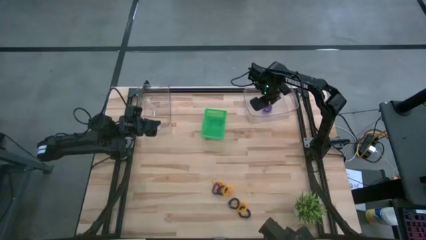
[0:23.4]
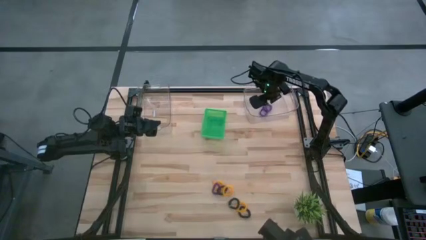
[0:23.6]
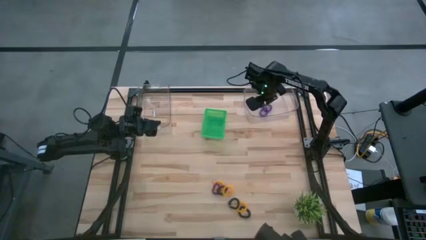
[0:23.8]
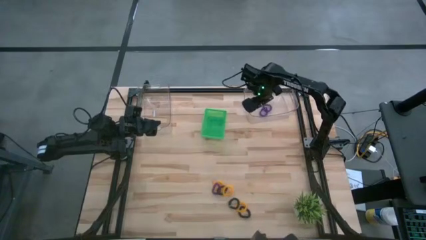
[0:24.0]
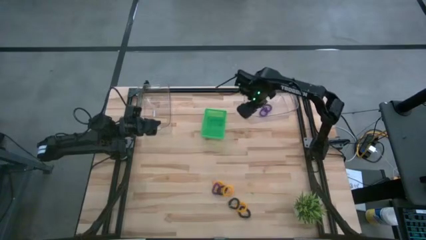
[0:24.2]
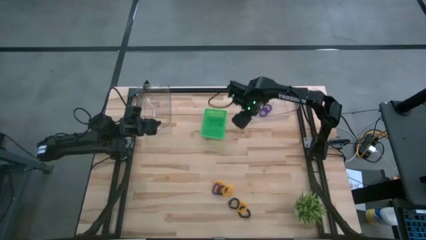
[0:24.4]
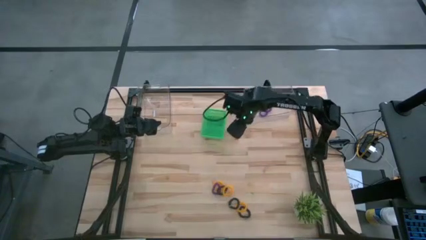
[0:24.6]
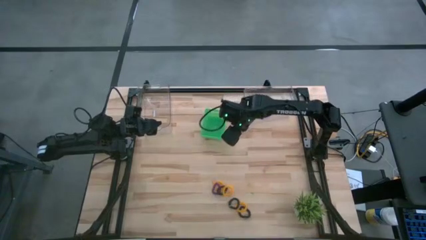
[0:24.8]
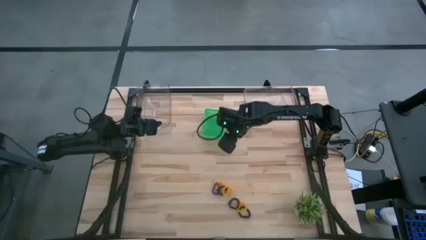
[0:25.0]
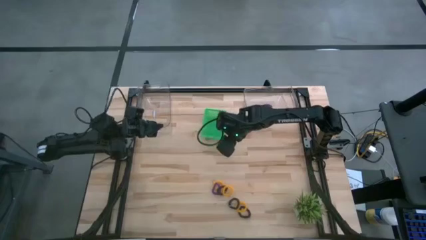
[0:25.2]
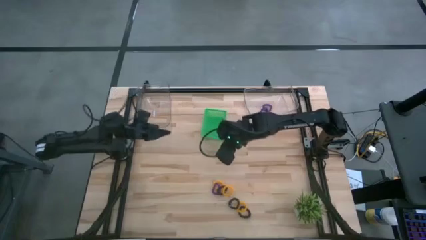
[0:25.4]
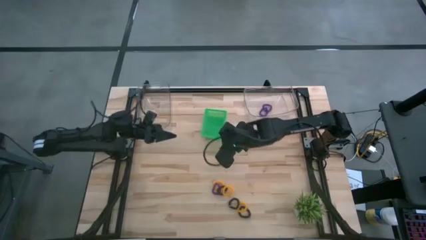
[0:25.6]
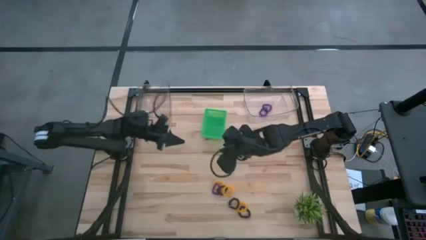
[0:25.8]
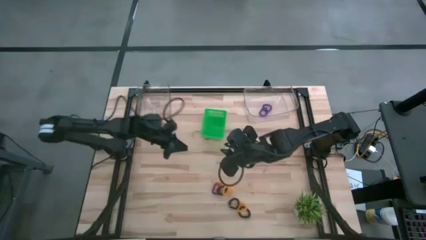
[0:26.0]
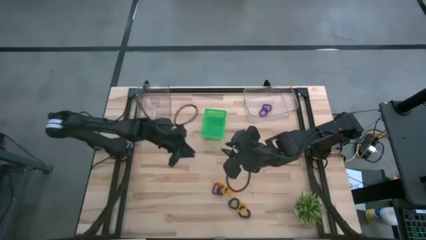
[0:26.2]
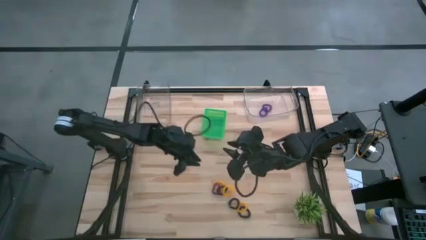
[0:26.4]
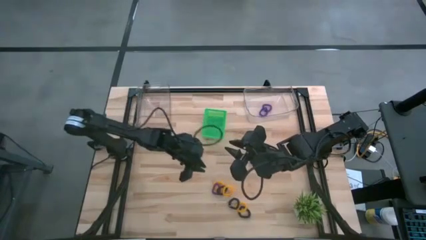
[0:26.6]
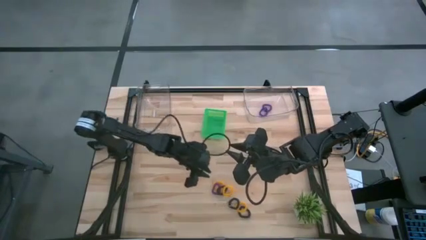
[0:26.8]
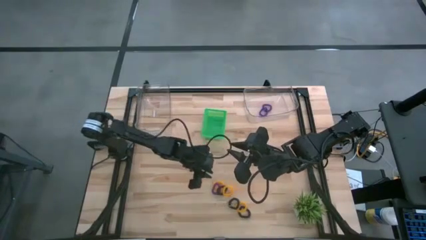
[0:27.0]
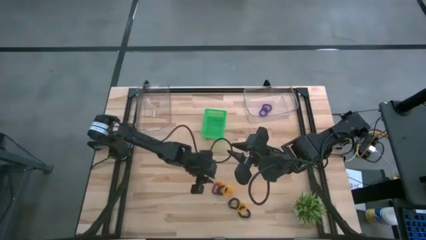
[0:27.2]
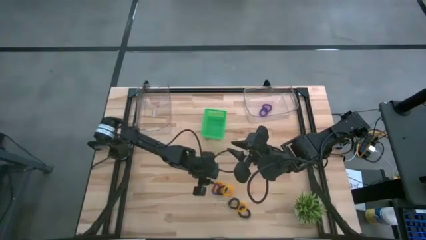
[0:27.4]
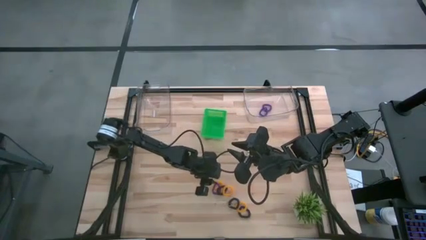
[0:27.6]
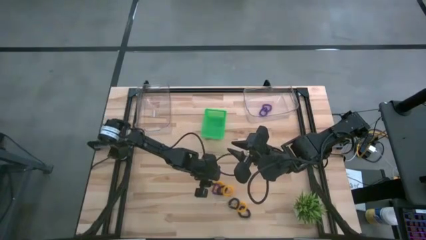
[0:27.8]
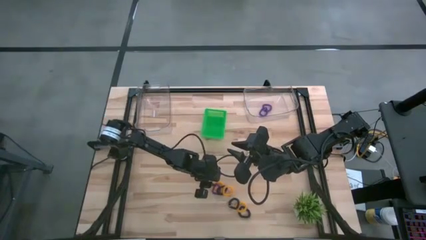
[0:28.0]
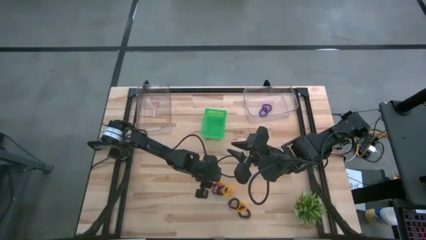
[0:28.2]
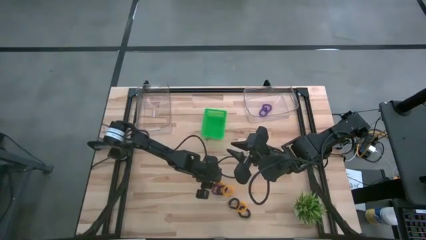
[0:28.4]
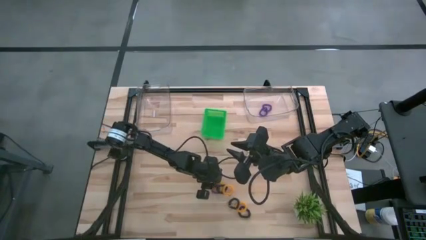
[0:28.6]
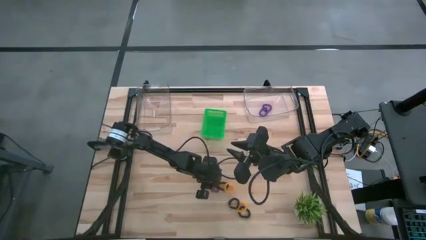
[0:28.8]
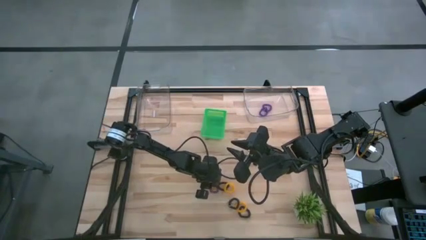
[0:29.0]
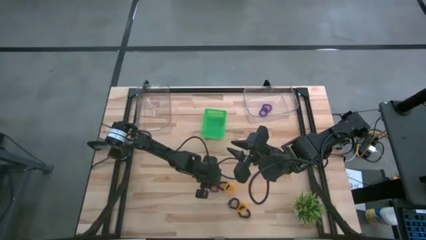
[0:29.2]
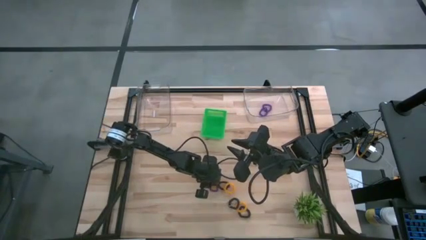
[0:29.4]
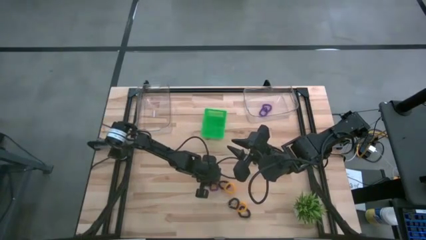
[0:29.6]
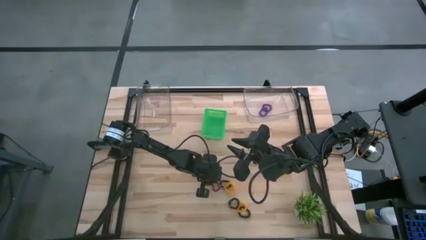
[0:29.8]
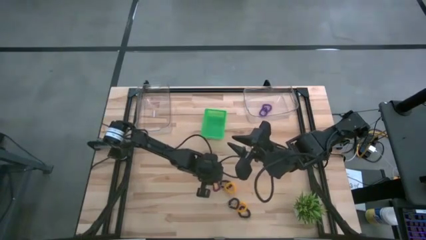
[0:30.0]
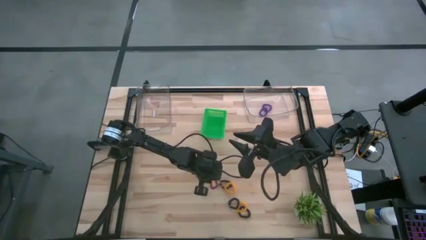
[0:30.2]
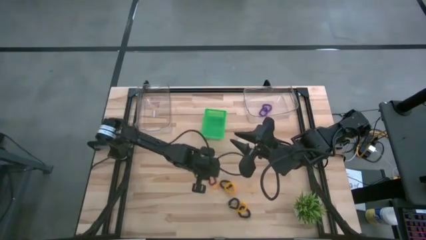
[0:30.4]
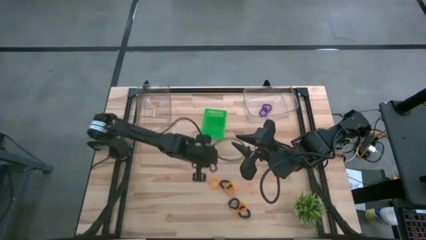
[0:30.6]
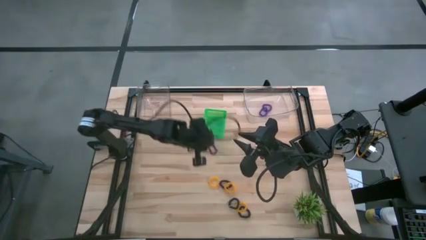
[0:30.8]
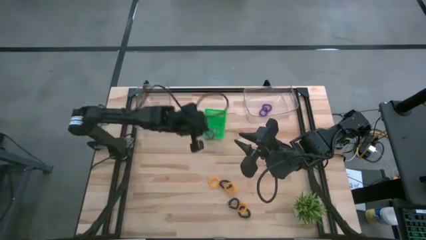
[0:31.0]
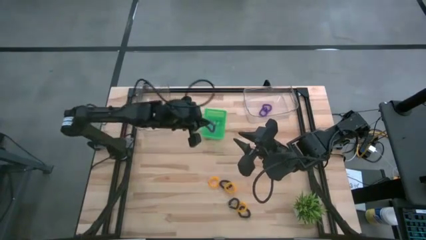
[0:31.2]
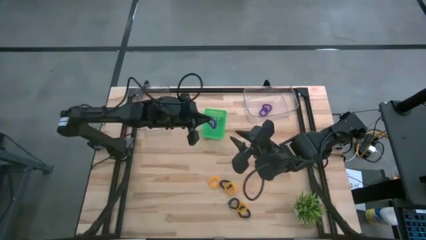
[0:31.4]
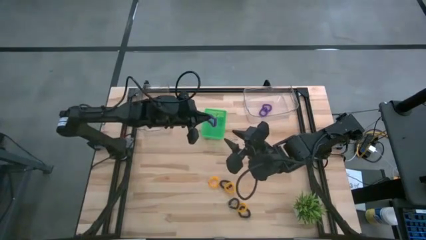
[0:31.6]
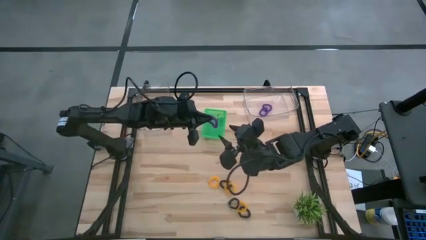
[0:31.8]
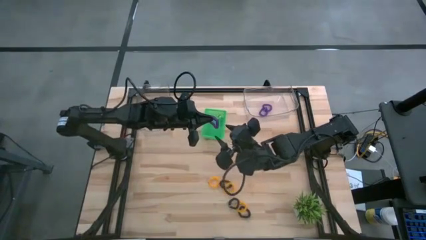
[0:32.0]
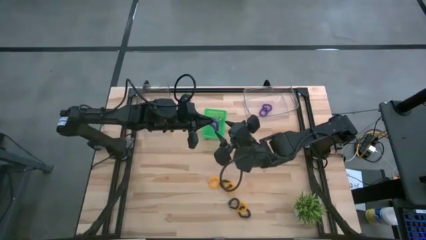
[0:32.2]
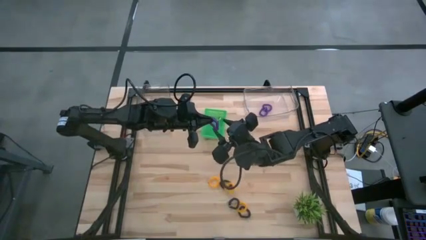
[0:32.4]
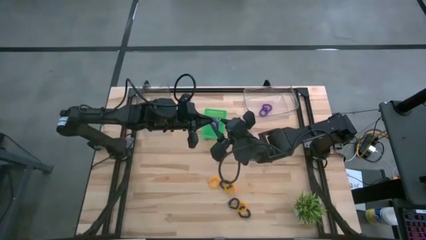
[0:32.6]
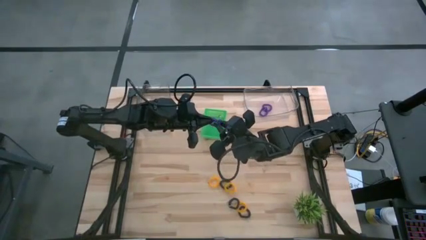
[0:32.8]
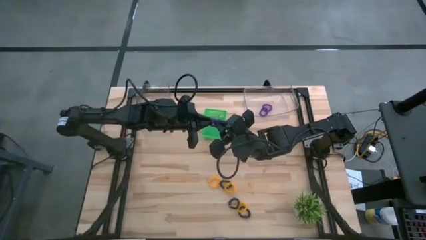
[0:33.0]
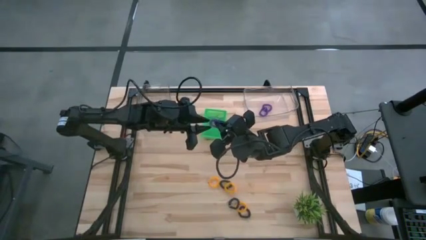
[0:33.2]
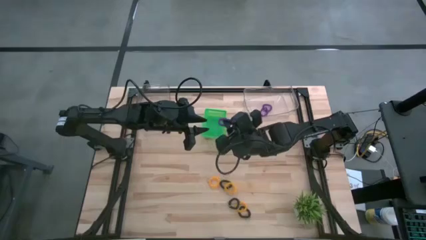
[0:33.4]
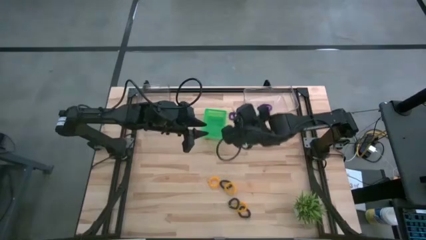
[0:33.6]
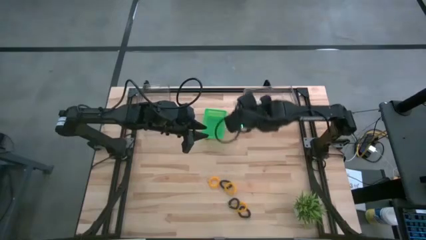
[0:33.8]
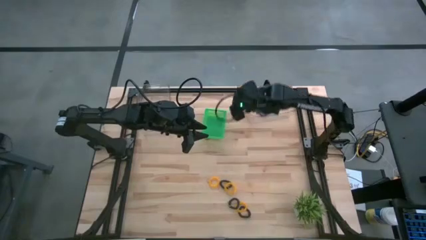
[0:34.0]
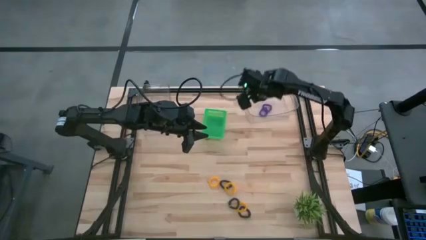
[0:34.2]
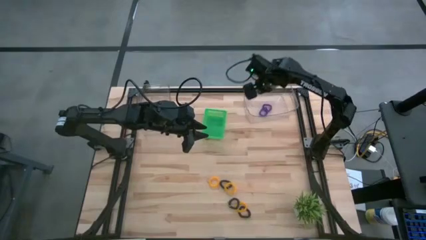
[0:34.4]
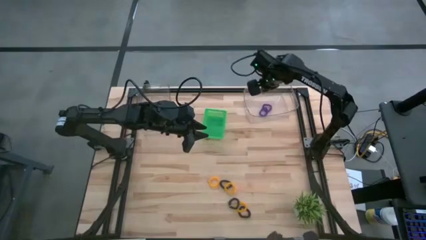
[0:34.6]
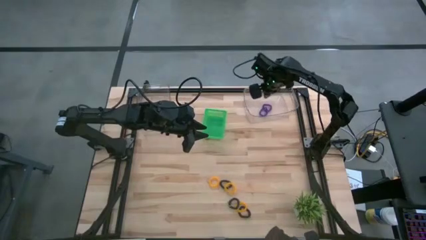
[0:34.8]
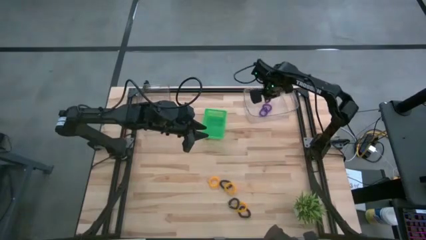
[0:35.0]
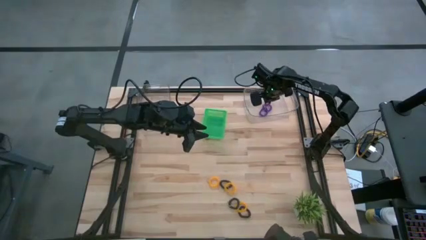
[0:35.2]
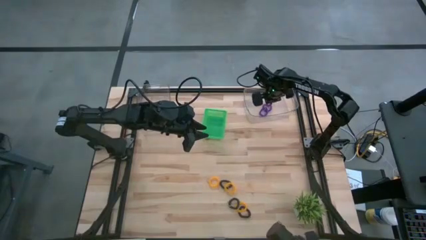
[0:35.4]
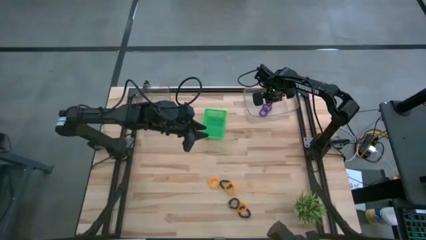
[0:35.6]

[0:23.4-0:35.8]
Task: Sort spring keychains
Put the purple spring keychain into the right transparent bin
